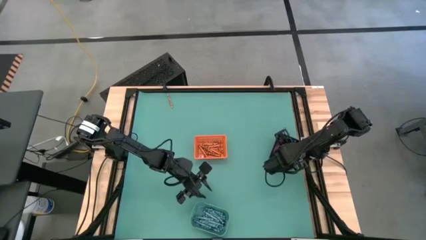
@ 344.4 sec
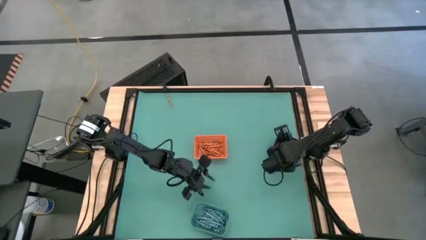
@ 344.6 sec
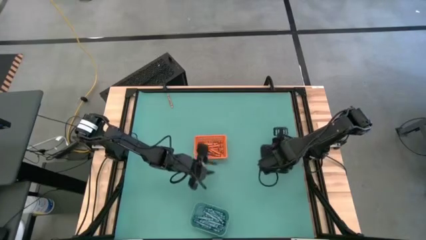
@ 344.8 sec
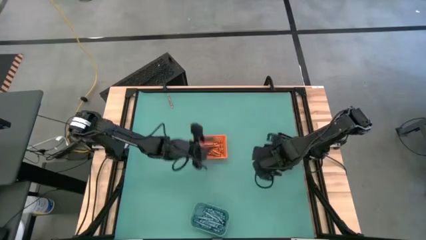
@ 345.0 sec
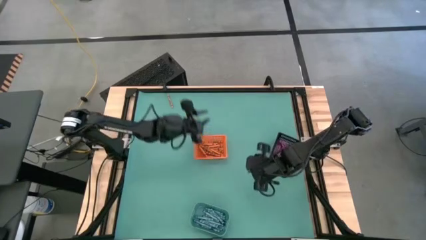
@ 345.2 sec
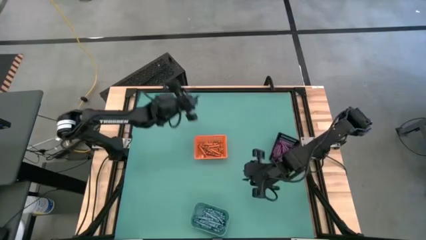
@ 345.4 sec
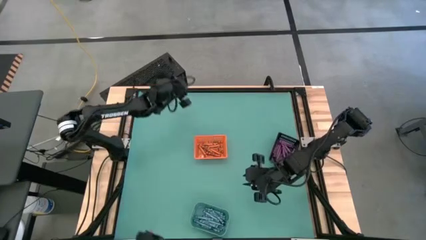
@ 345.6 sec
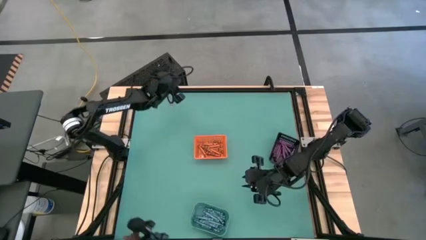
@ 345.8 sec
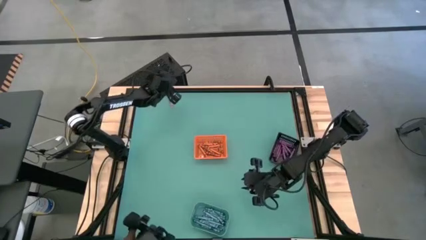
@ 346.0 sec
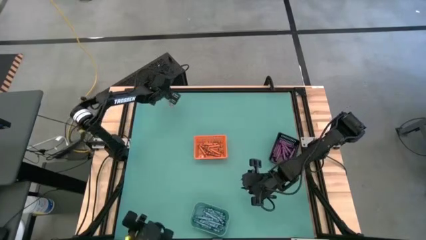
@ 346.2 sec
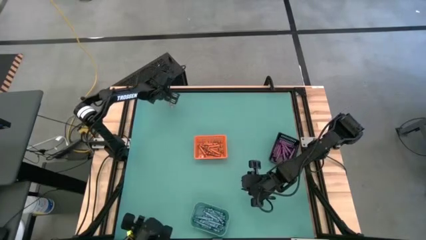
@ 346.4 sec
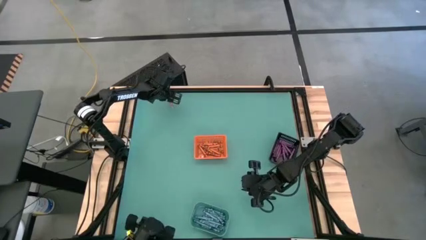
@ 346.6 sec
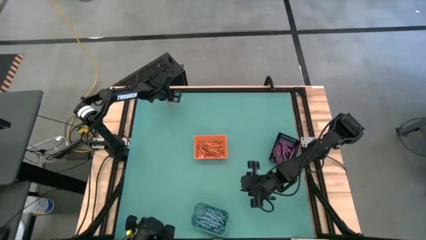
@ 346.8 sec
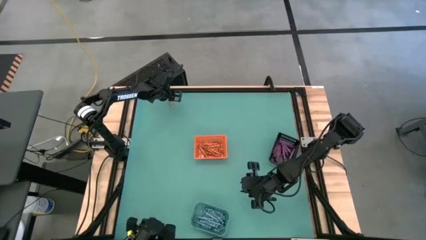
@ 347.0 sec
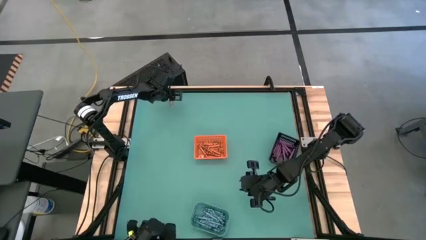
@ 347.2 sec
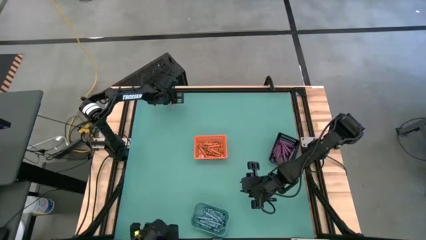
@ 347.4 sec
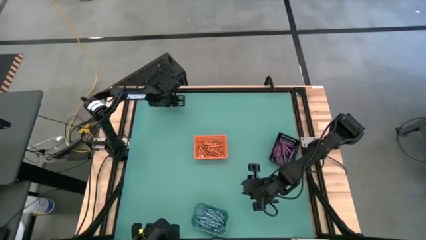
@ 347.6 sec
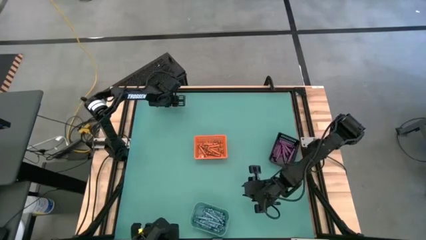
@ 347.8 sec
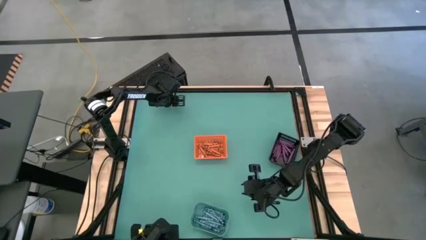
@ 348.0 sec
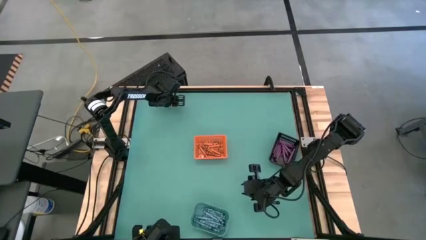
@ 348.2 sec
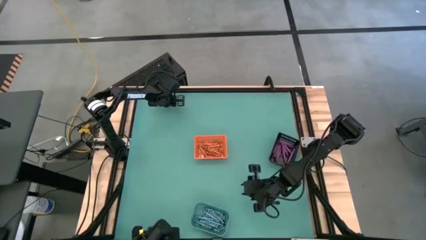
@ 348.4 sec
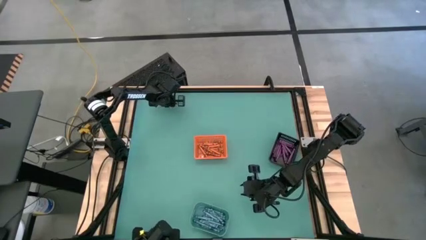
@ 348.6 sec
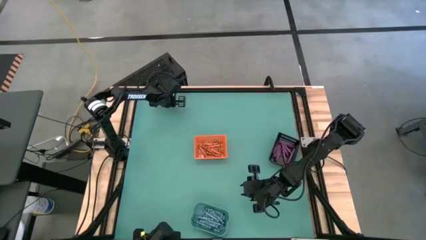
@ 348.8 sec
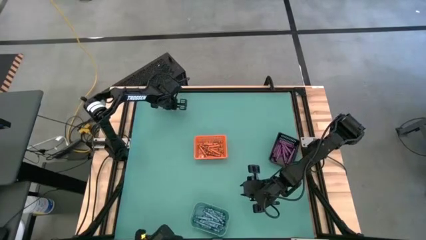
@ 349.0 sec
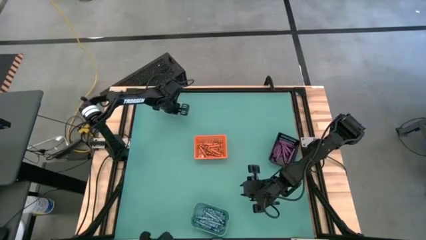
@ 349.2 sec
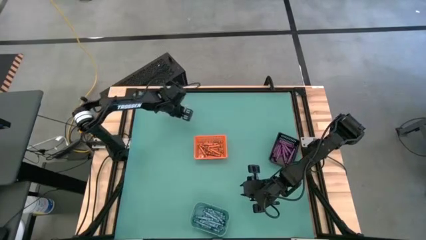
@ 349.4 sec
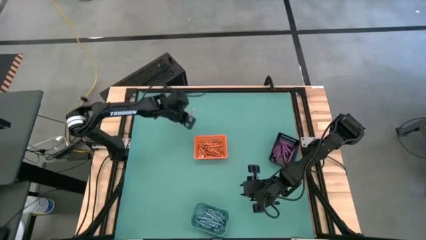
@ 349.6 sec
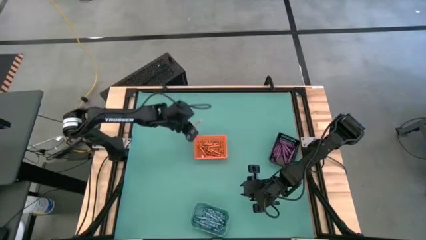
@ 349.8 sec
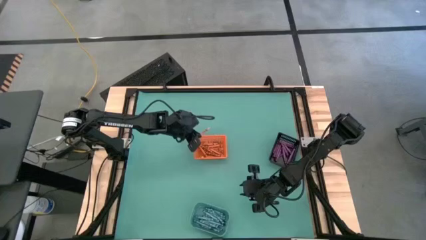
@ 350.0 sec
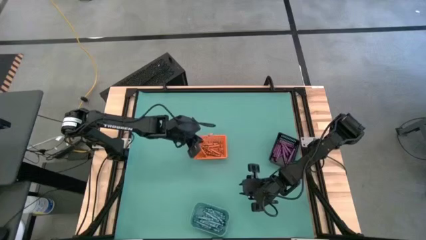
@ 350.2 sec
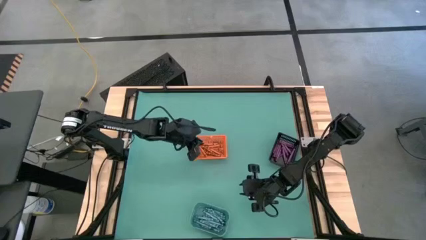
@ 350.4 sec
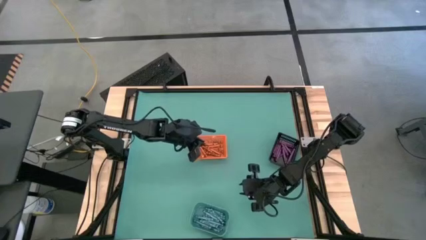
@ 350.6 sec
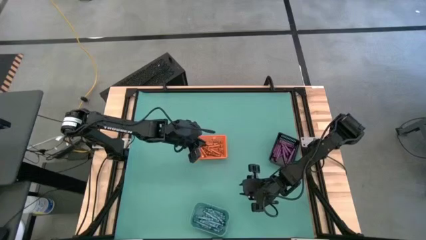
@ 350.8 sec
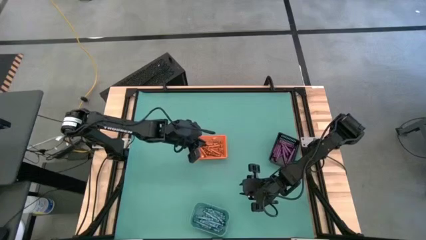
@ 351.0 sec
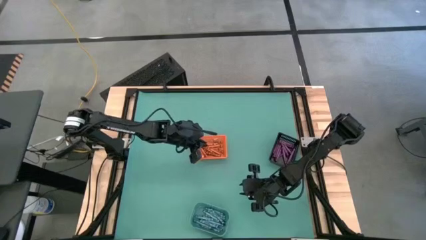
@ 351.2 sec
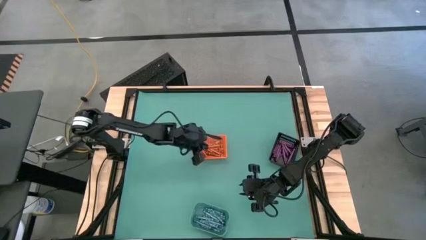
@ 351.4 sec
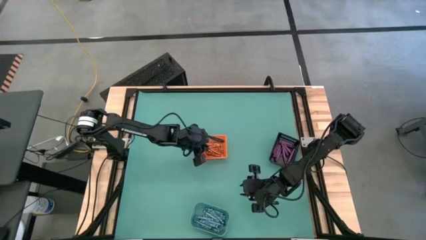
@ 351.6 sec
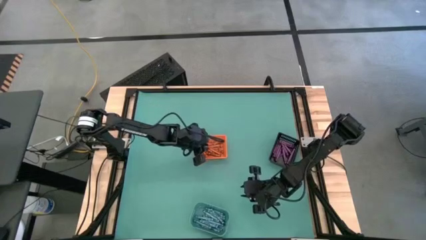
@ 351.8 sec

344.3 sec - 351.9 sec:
Task: Sort crayons
Put the orange crayon into the orange bin

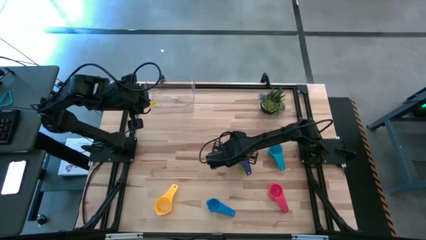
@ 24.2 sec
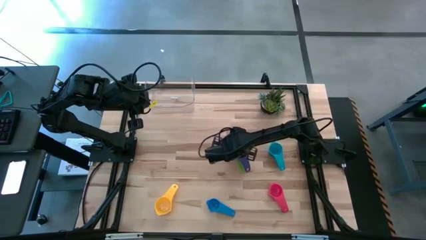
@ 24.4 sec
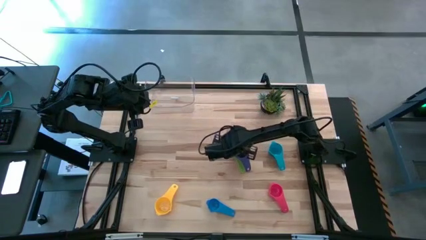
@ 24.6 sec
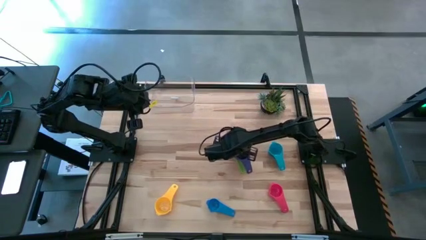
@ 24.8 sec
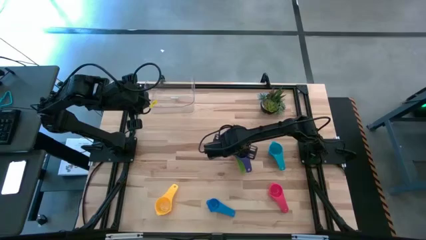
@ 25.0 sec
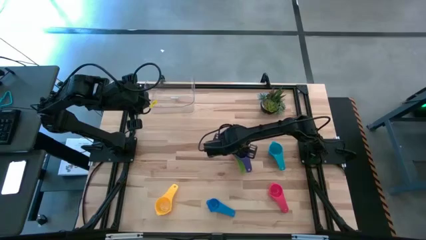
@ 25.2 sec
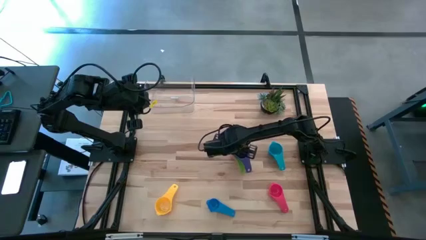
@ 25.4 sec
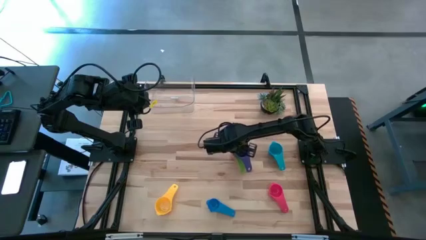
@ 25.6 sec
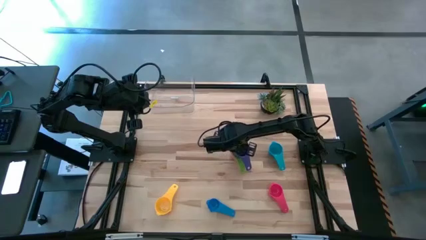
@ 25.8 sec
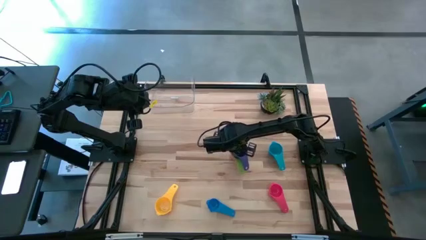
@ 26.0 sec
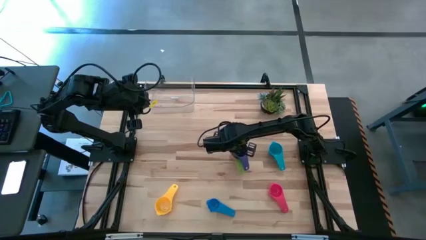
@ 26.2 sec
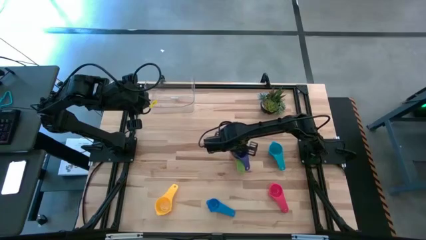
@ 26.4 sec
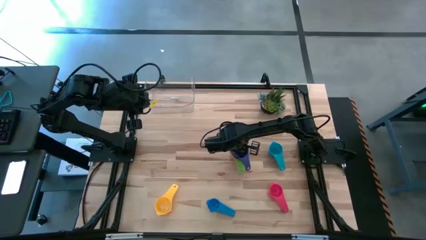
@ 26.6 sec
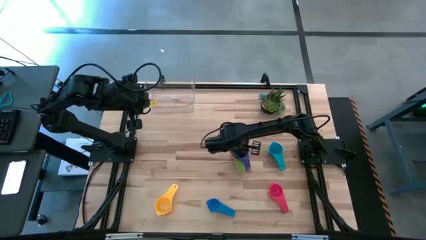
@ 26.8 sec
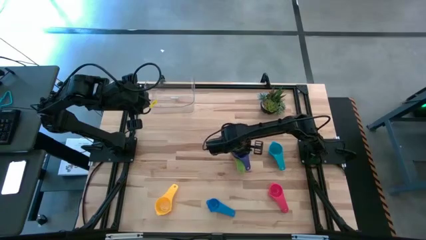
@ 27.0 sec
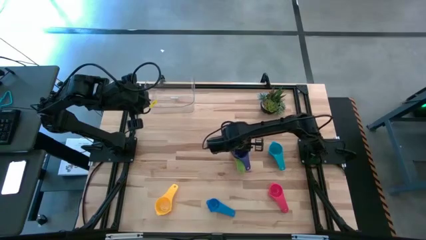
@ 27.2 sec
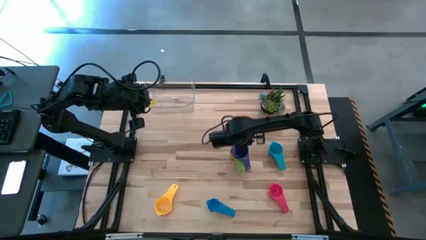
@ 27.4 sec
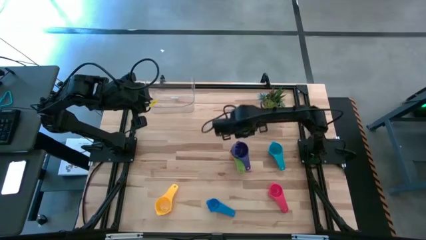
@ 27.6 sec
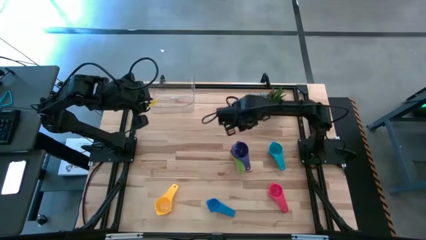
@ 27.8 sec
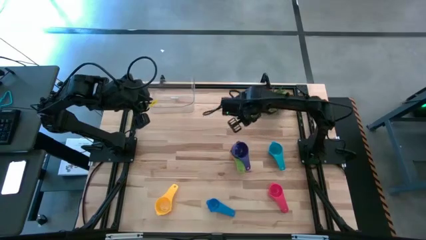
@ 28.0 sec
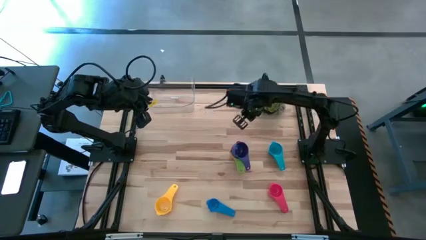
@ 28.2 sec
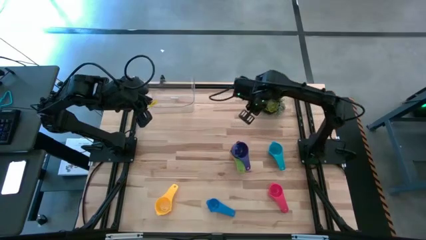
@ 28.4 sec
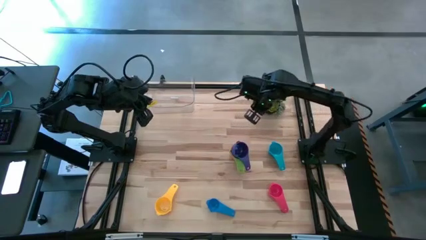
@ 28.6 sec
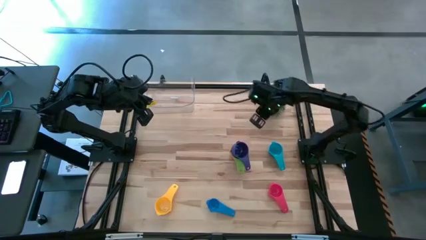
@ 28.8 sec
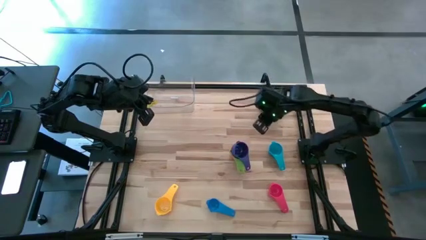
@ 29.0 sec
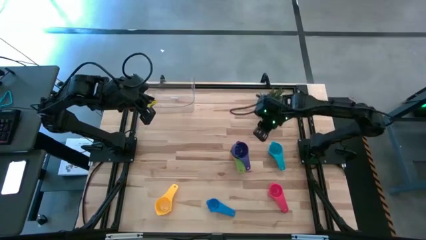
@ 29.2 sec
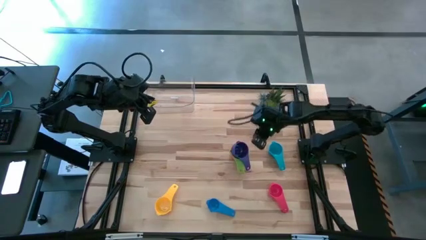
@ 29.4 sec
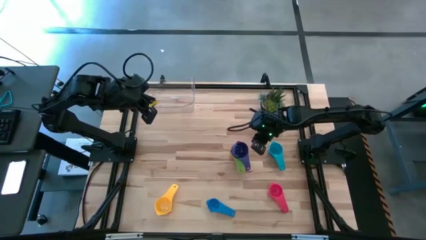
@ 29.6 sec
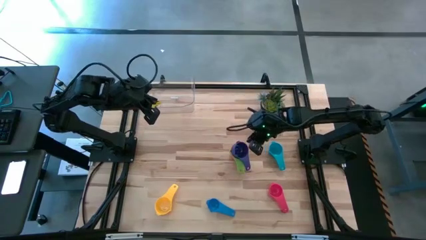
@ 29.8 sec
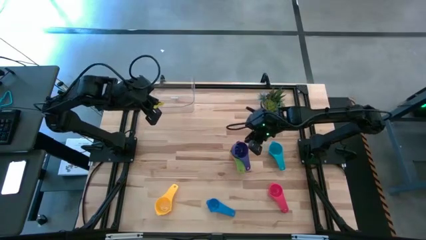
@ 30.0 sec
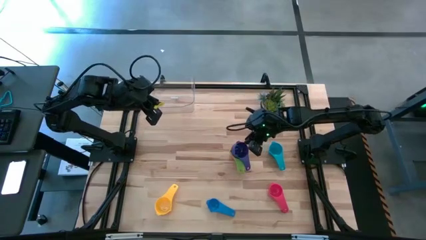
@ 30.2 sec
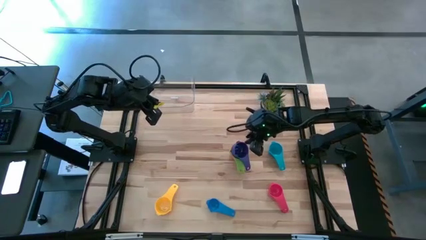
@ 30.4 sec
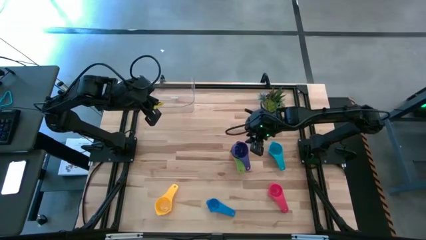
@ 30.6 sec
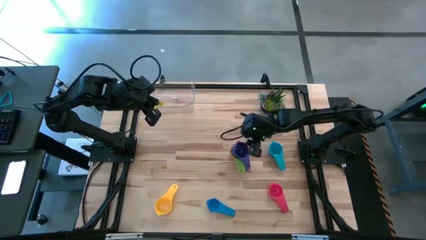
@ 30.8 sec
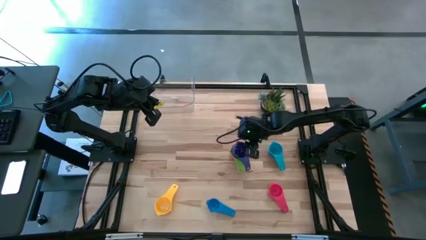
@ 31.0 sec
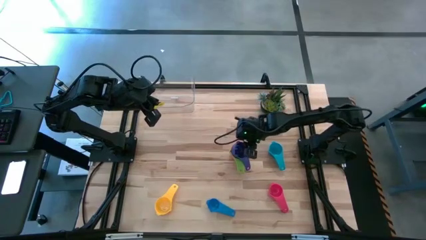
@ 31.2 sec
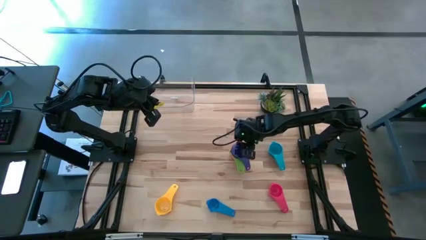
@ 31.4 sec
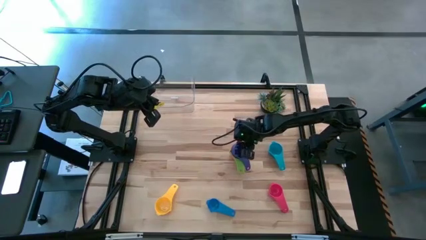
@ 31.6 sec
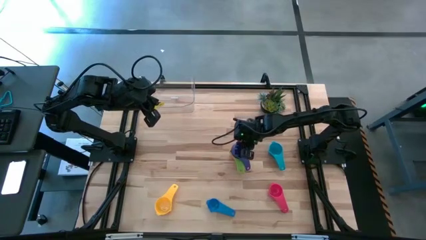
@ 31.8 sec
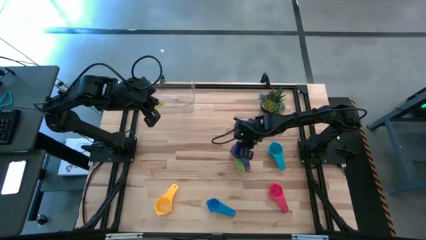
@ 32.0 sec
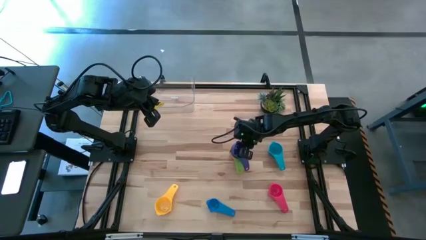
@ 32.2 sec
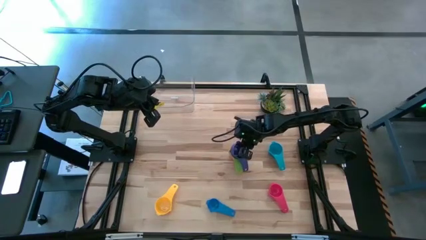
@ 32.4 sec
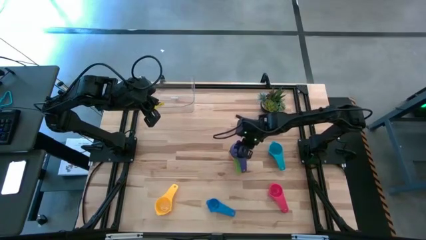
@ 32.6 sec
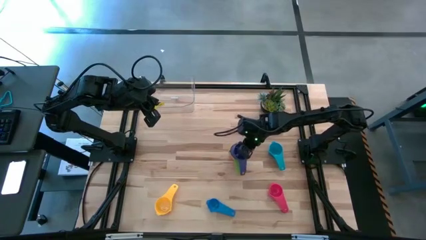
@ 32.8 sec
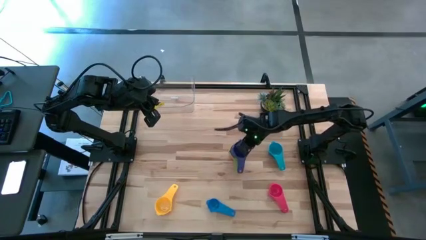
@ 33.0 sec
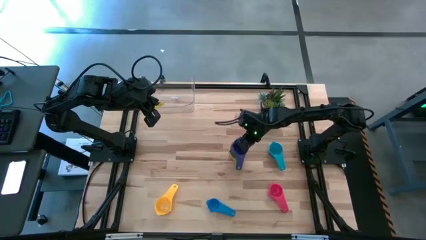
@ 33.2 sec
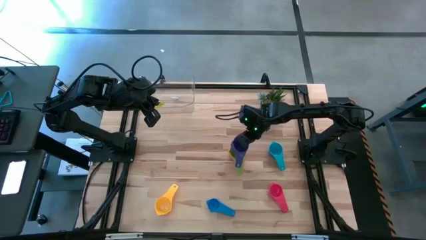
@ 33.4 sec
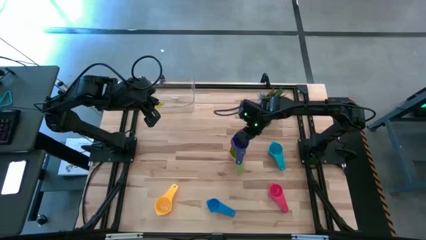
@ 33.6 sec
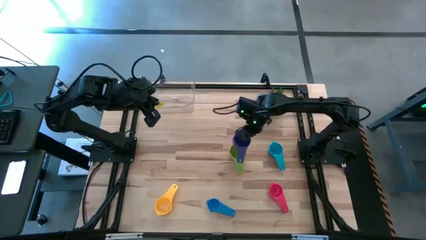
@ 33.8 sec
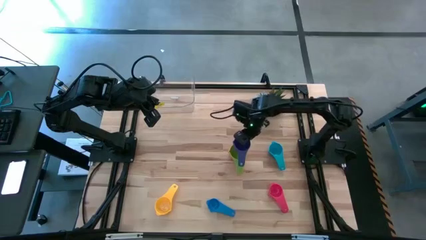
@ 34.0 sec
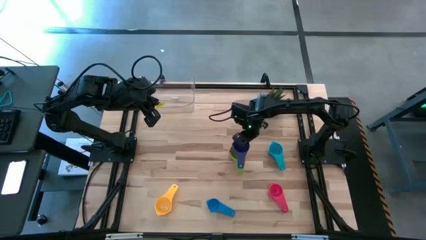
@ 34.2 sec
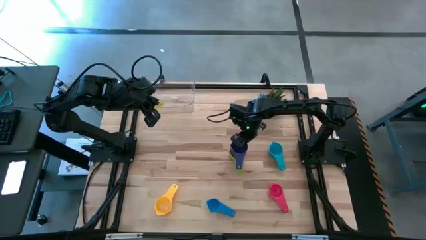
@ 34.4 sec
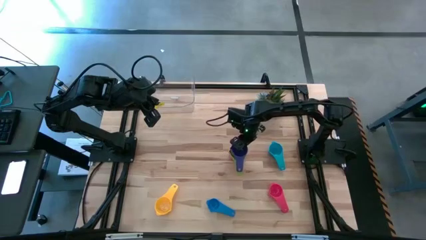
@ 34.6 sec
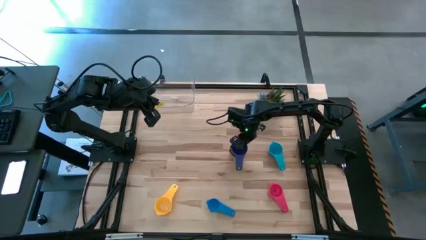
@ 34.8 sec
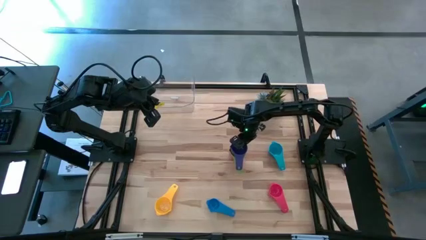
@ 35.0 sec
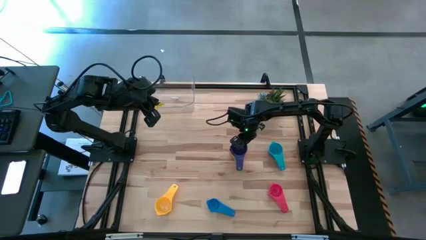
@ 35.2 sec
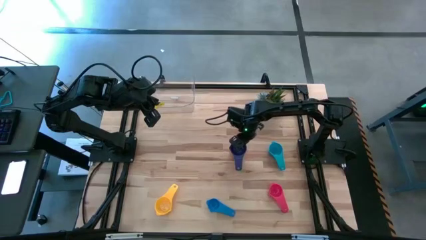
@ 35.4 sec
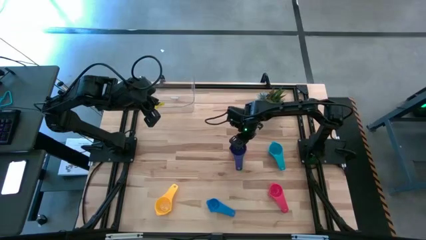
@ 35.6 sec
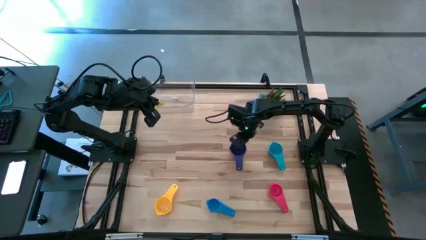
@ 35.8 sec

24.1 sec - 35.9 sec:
Task: Nest measuring cups in basket
Stack the dark blue measuring cup on top of the green measuring cup
